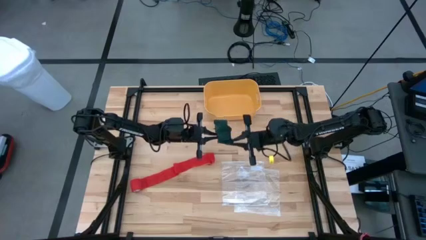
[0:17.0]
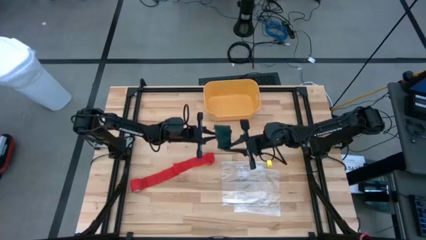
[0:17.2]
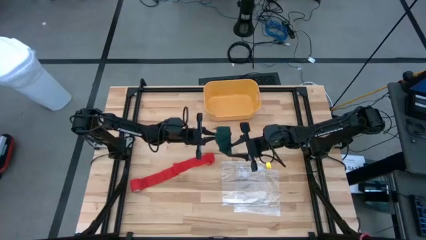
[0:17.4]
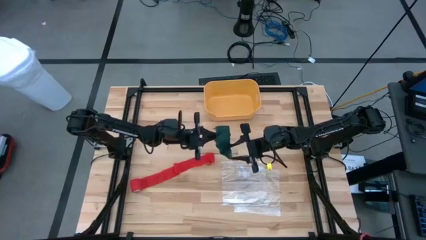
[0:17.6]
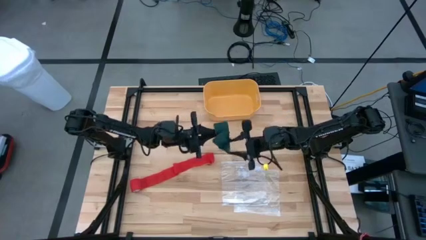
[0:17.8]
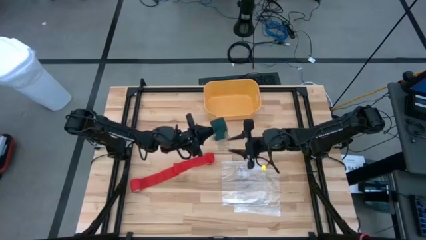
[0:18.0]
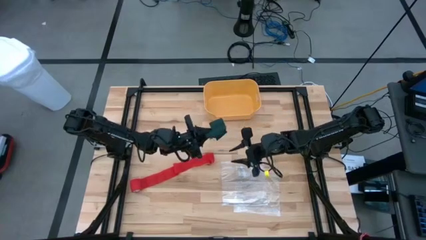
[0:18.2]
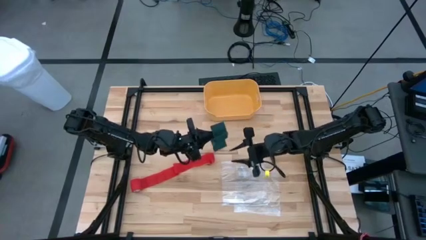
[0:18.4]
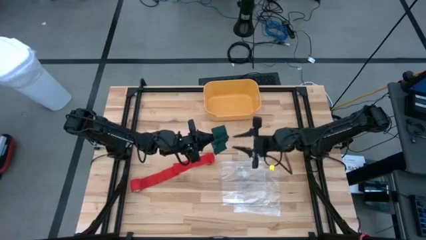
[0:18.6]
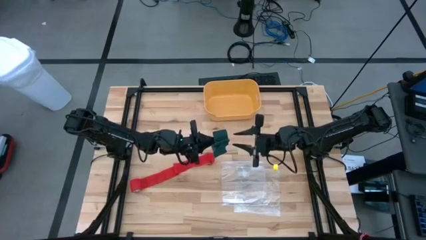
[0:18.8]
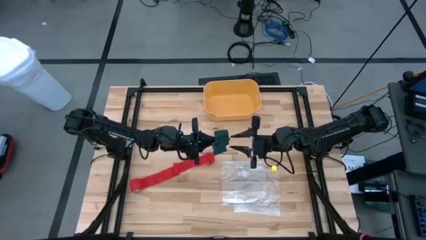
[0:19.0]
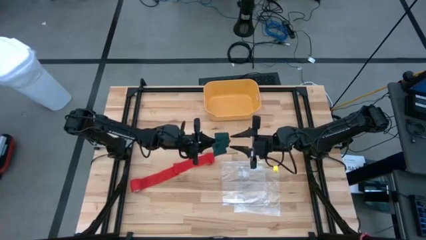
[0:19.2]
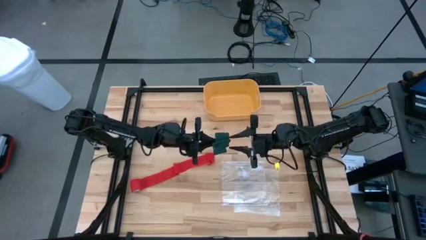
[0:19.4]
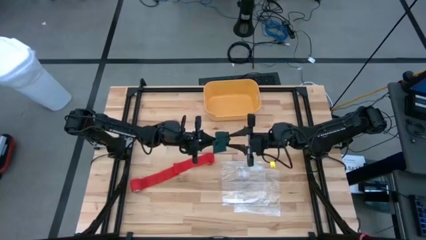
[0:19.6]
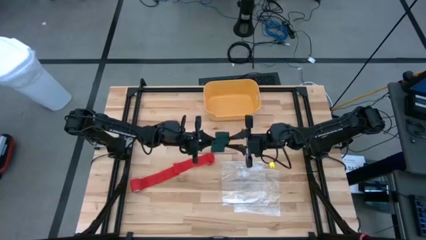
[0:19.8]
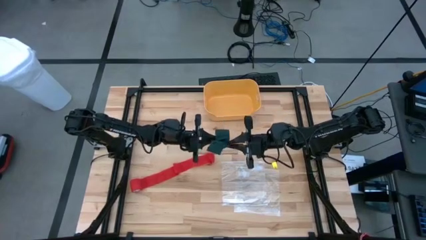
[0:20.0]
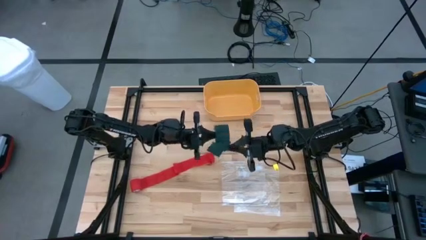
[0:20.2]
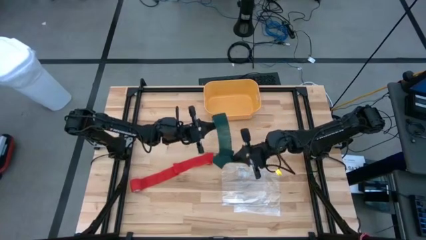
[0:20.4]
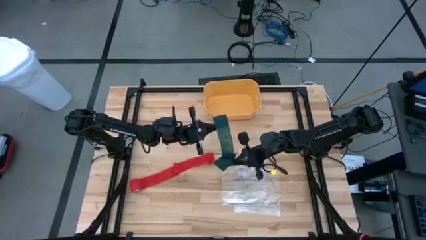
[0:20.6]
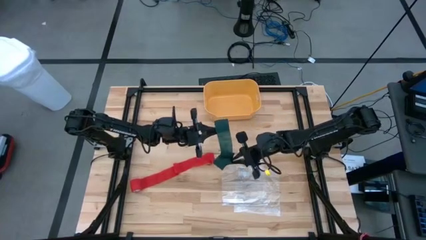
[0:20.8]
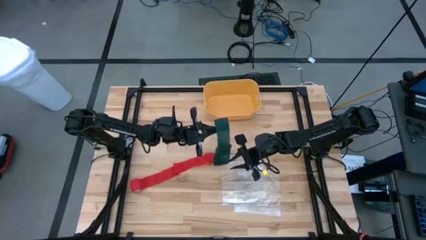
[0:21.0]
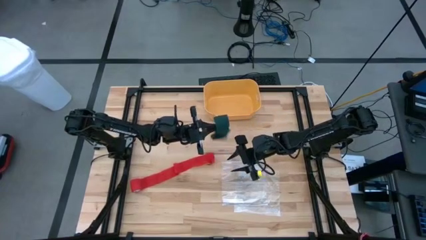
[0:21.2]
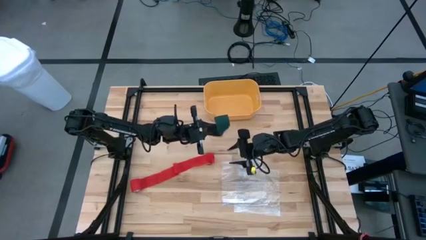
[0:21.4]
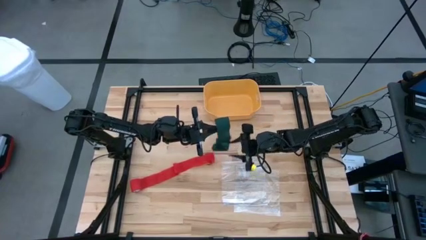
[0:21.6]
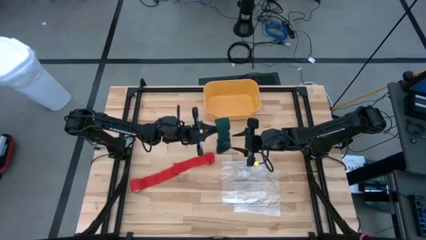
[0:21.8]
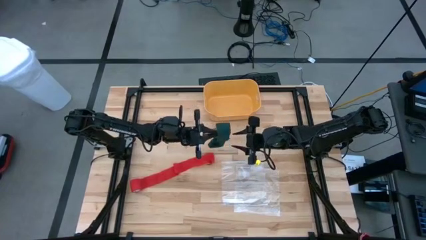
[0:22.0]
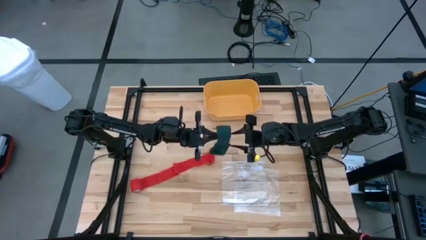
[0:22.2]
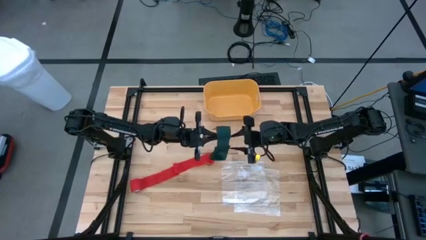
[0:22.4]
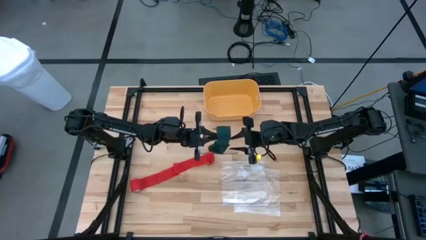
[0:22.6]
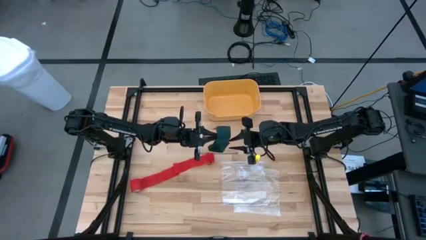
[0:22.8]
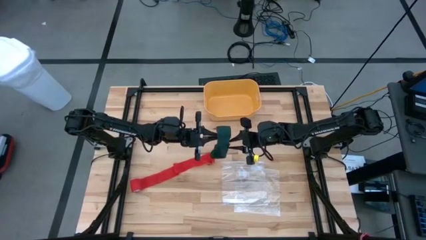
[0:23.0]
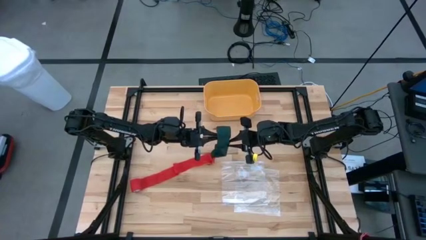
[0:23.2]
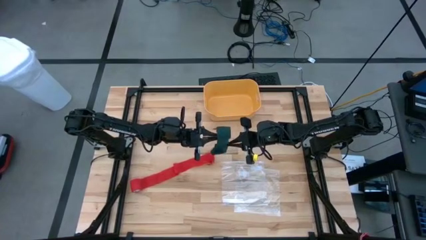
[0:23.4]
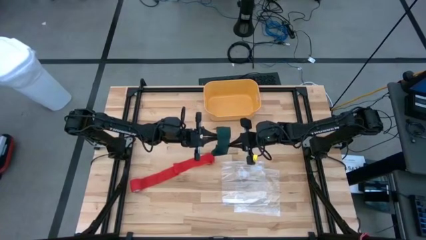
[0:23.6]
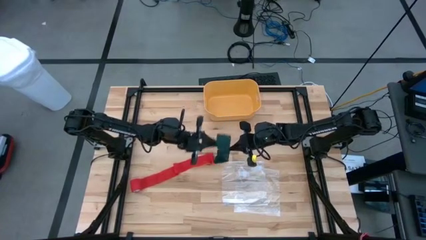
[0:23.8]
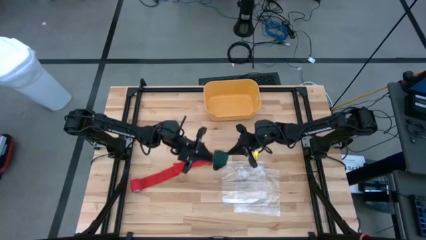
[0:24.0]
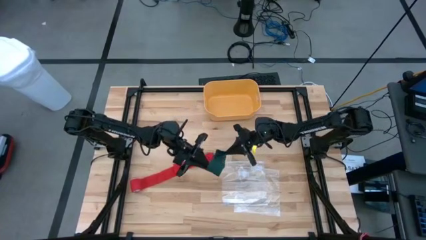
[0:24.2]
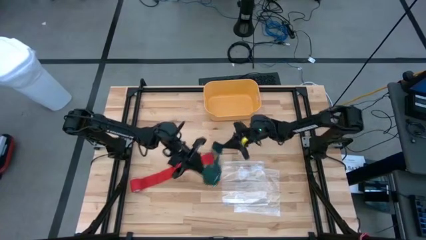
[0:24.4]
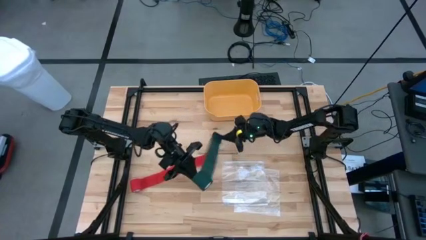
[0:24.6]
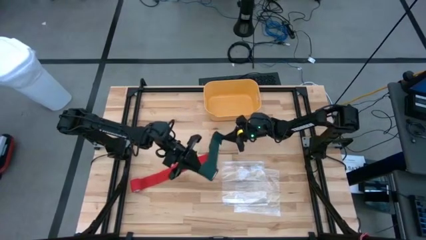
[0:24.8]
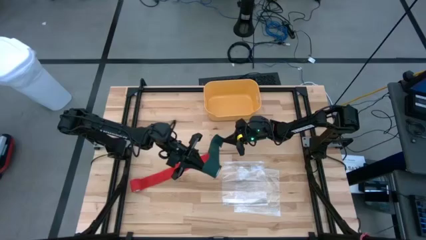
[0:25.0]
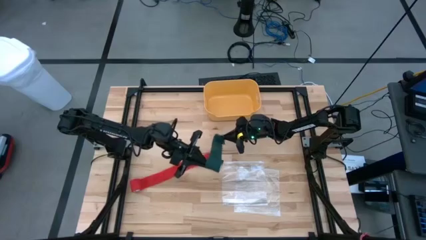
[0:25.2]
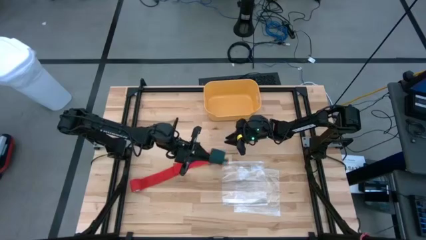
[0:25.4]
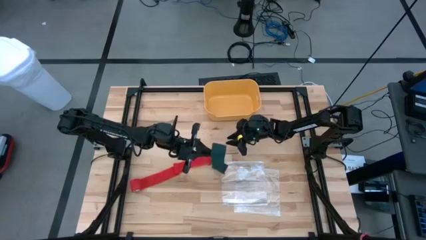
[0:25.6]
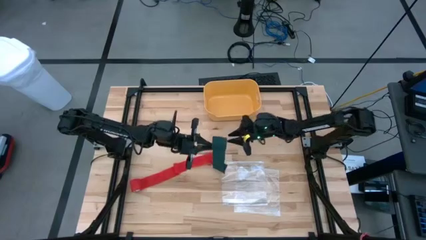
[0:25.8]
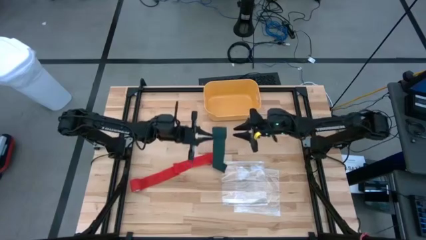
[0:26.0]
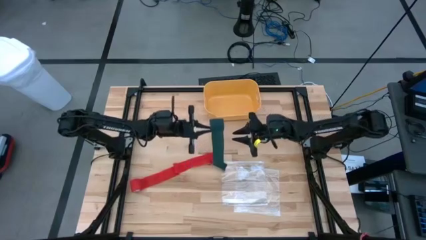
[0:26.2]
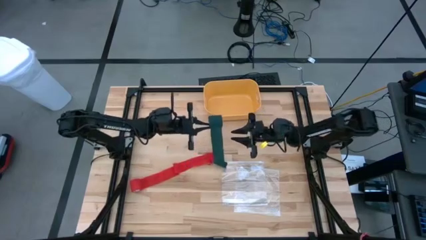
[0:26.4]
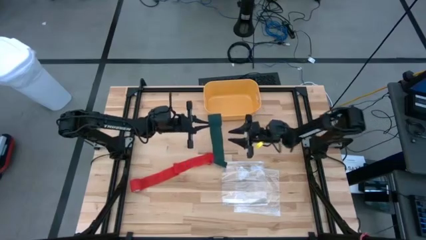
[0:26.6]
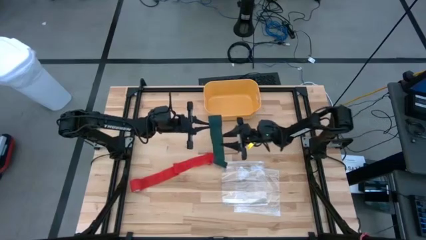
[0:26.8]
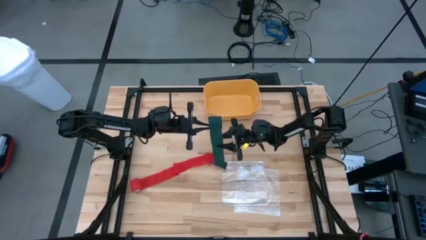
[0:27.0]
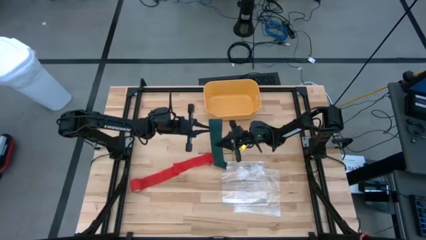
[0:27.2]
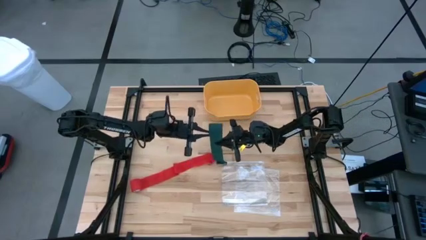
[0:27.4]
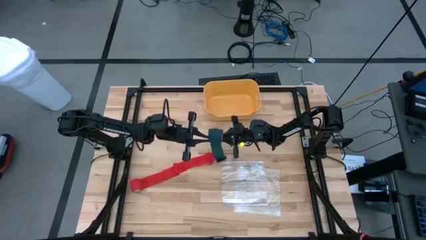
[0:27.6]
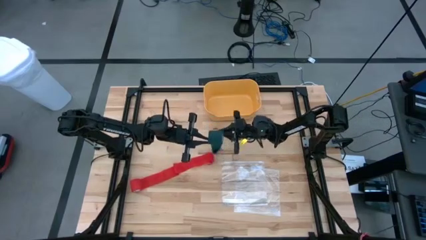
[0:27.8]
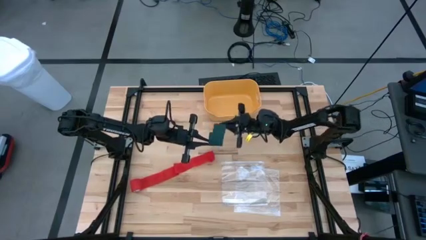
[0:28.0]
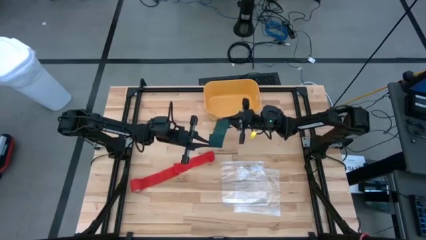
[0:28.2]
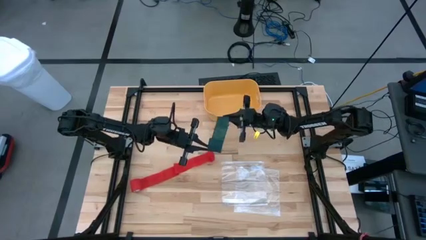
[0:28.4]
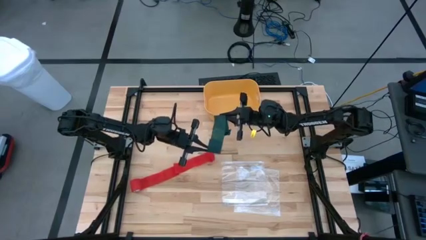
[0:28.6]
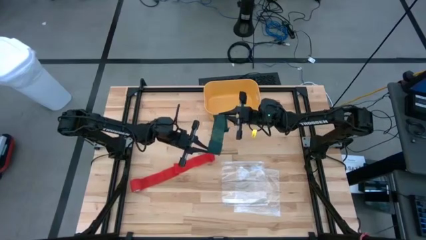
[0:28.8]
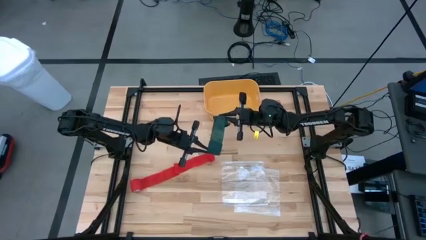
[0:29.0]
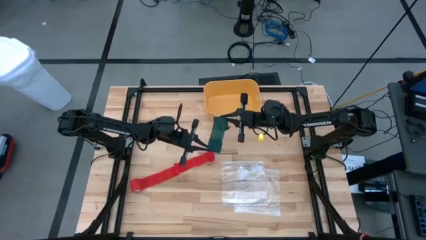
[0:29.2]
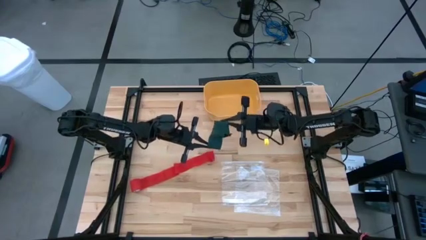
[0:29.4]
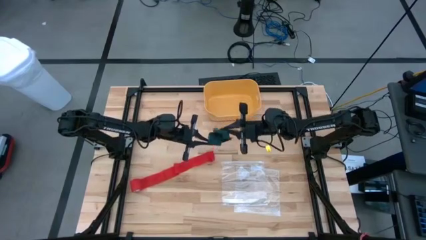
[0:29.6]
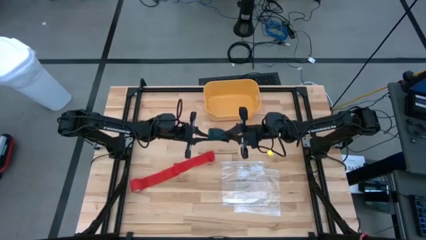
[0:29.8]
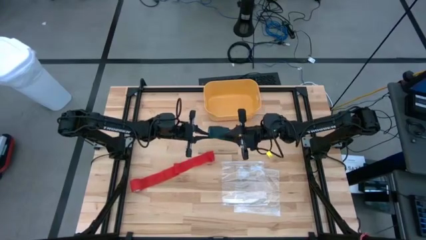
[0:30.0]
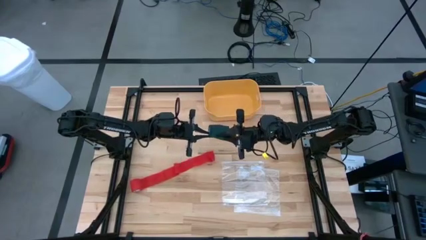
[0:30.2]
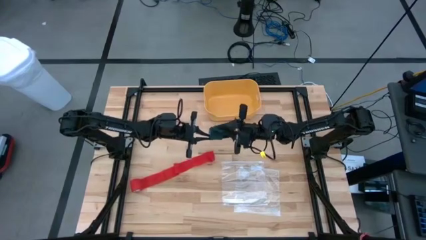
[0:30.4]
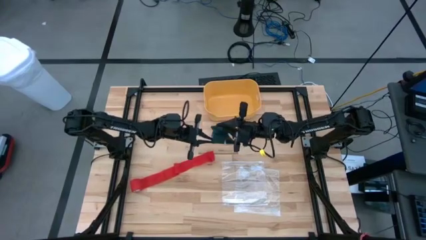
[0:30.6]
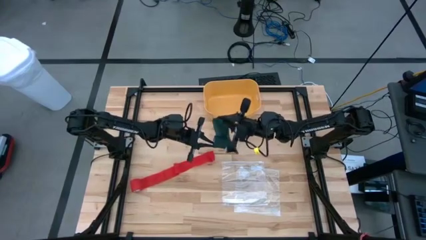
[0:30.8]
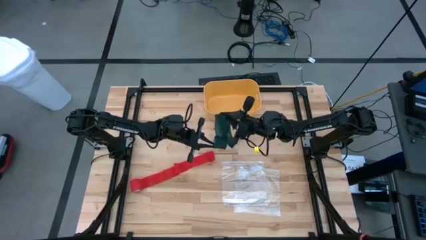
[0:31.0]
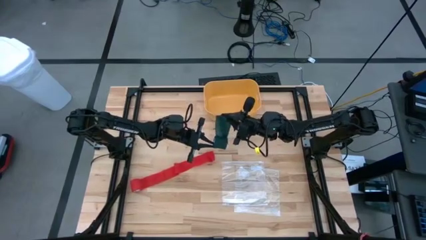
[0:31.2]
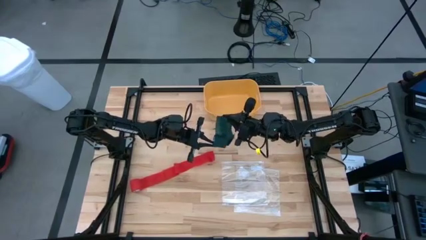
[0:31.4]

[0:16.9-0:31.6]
Task: Roll bandage
Roll the green bandage
